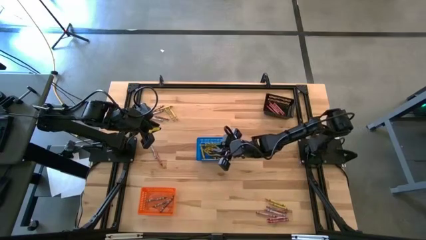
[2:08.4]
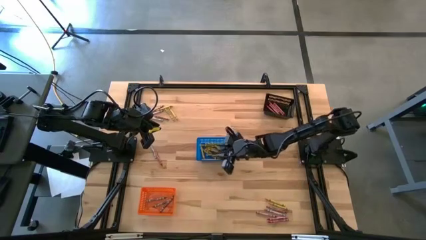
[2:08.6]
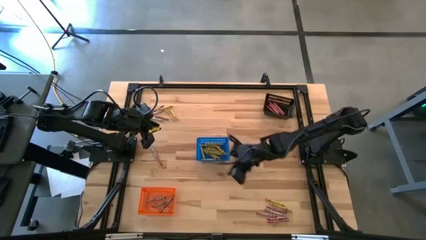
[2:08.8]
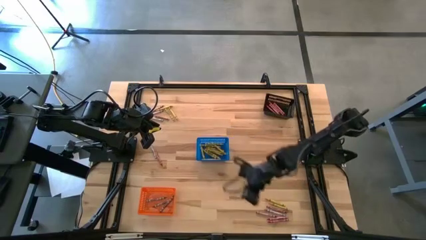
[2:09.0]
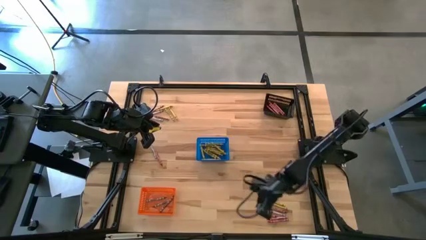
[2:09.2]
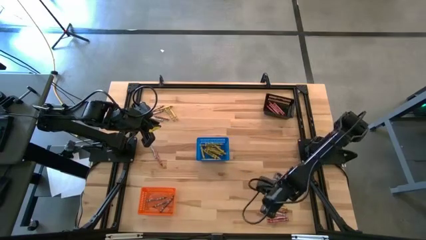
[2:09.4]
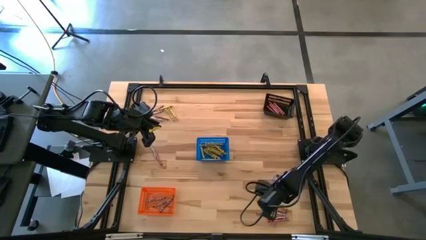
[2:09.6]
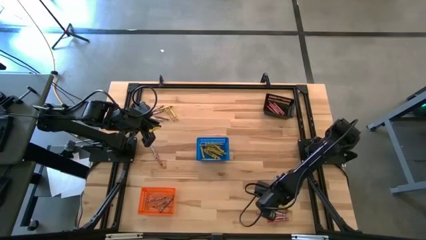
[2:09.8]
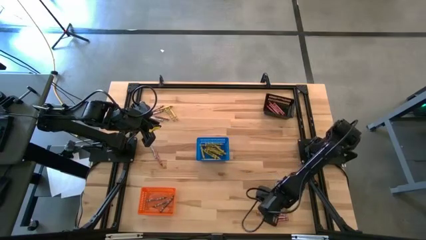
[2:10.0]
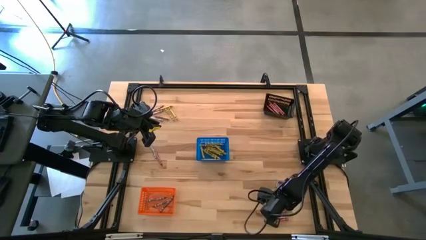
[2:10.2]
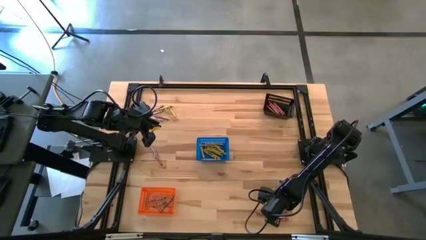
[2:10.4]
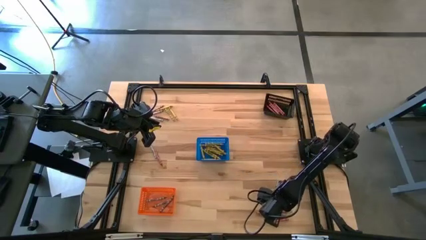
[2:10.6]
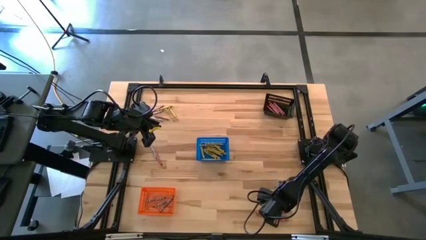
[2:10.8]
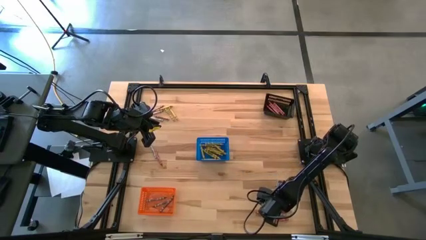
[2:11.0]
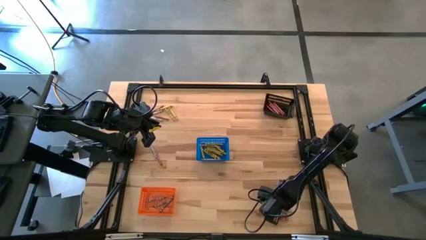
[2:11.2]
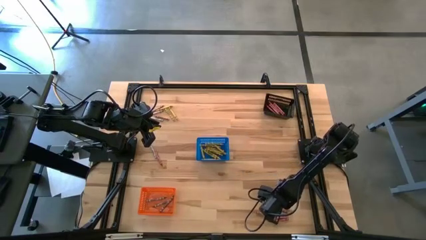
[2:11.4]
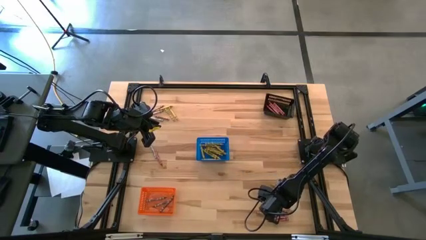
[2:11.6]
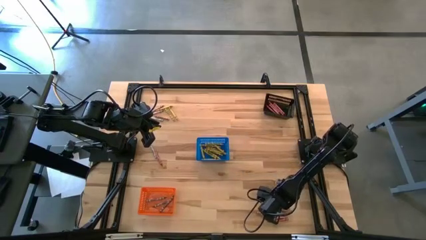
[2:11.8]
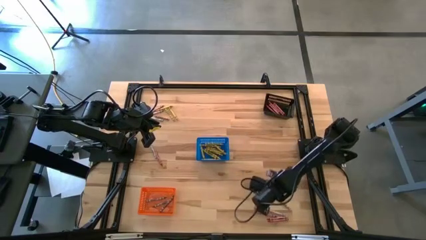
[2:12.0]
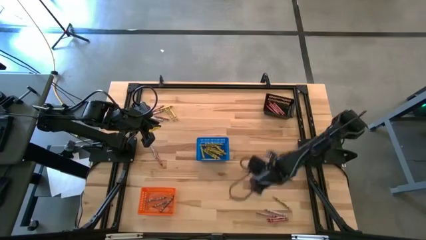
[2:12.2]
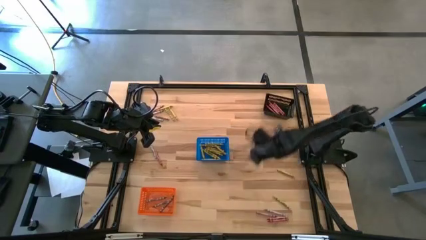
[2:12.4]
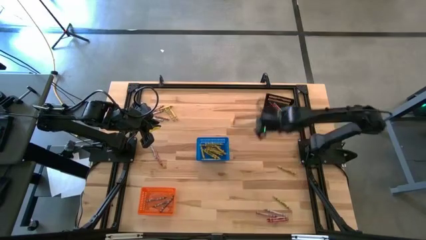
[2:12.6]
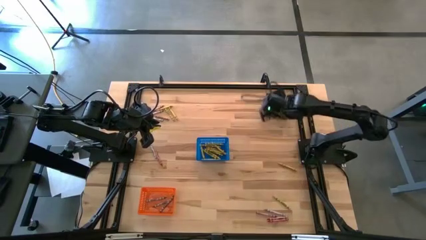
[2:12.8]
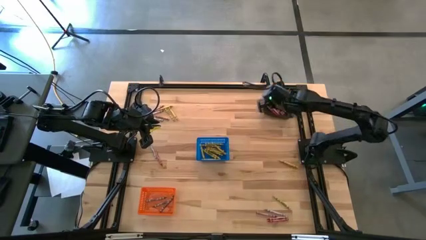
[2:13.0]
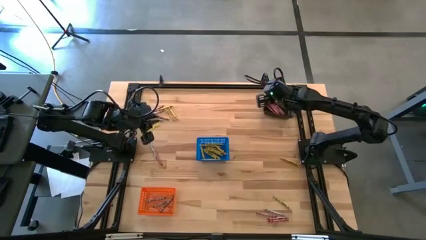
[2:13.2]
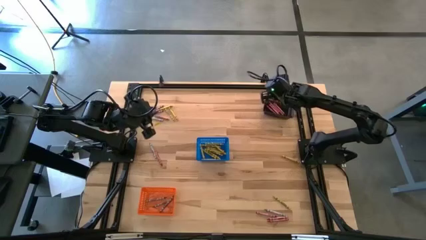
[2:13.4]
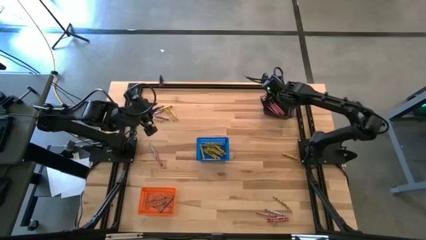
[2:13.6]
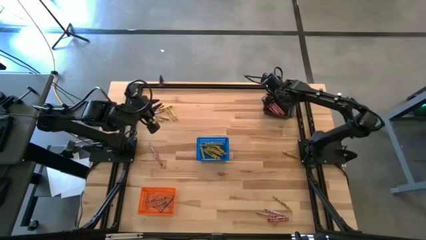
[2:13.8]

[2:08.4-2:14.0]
Task: Sort crayons
Put the red crayon into the black basket

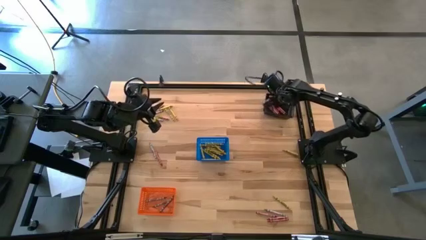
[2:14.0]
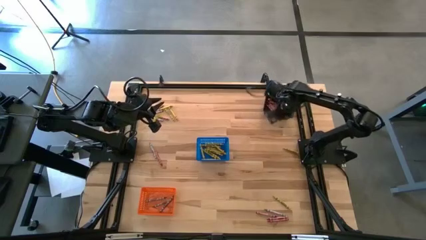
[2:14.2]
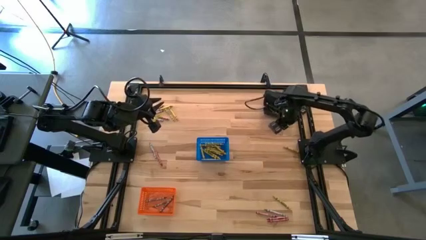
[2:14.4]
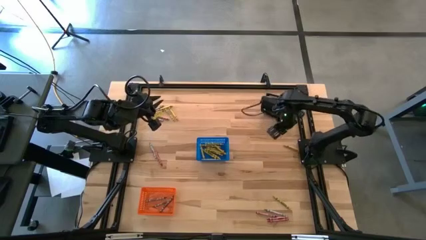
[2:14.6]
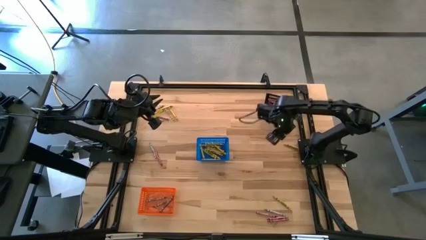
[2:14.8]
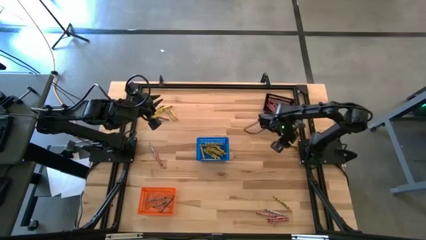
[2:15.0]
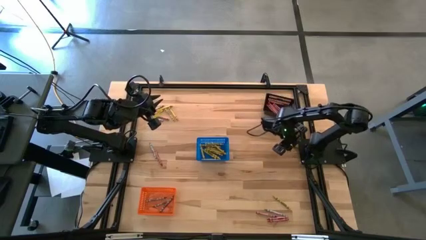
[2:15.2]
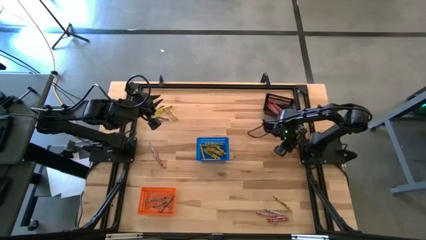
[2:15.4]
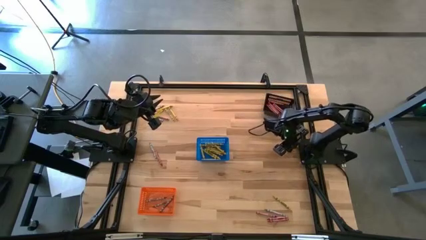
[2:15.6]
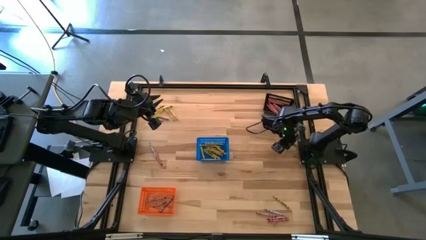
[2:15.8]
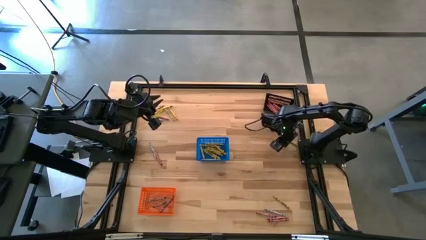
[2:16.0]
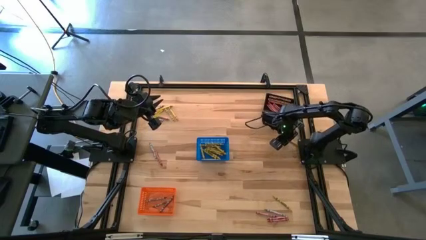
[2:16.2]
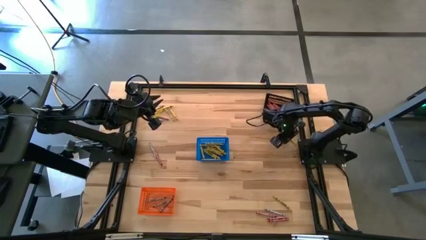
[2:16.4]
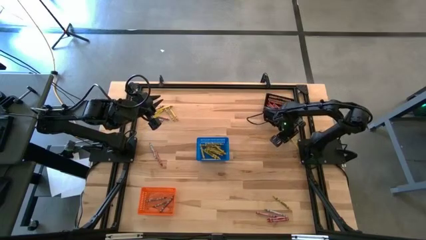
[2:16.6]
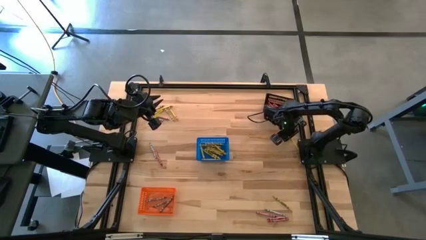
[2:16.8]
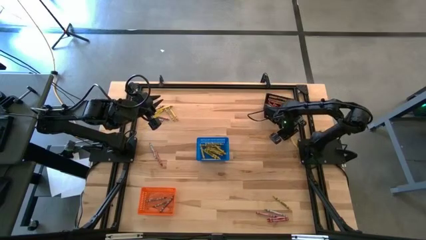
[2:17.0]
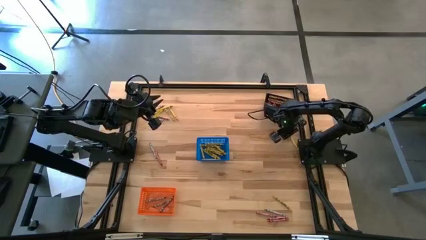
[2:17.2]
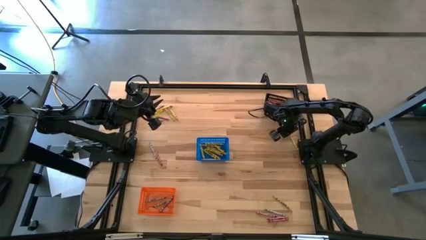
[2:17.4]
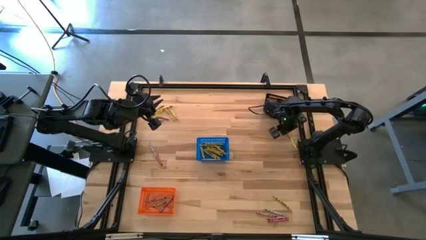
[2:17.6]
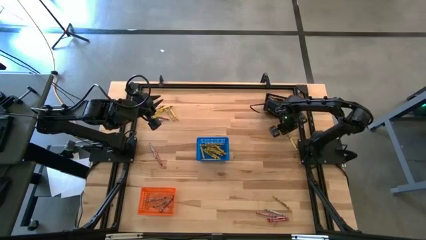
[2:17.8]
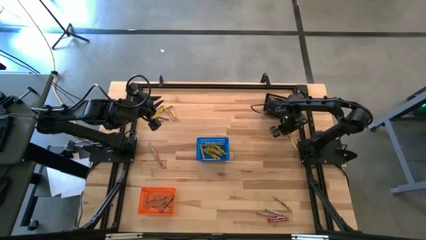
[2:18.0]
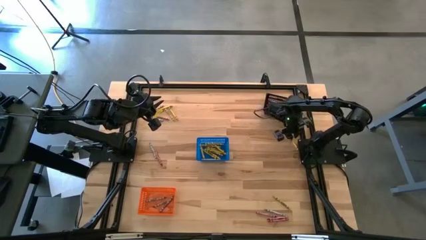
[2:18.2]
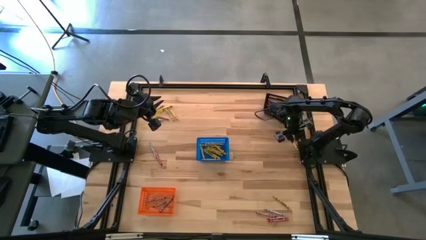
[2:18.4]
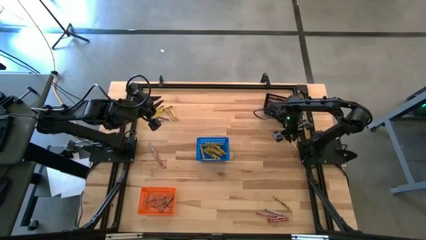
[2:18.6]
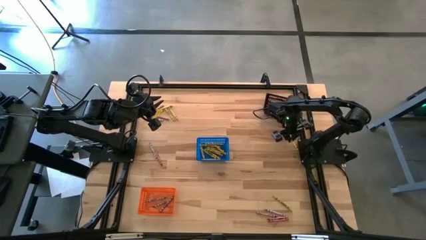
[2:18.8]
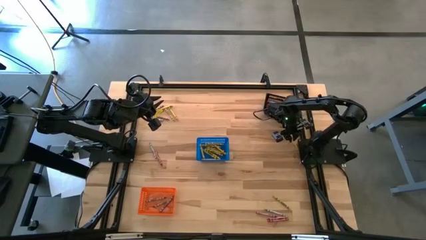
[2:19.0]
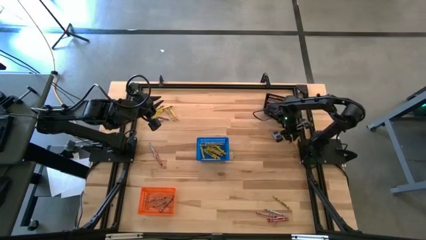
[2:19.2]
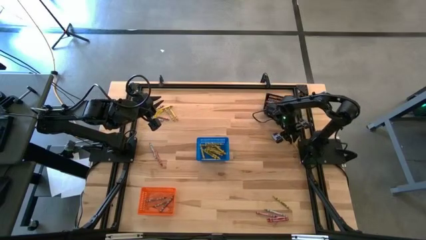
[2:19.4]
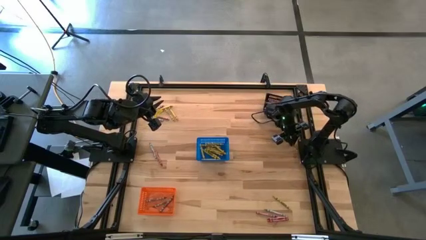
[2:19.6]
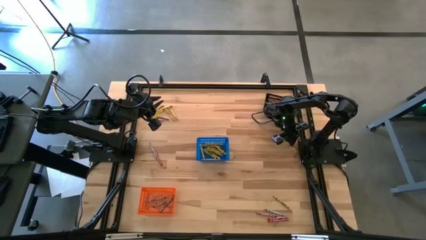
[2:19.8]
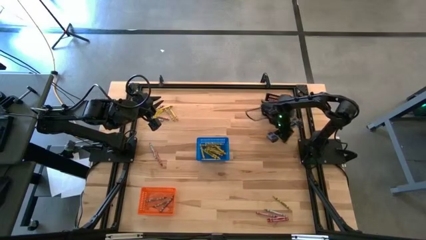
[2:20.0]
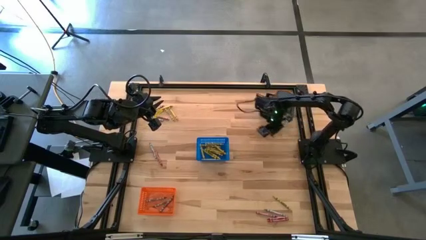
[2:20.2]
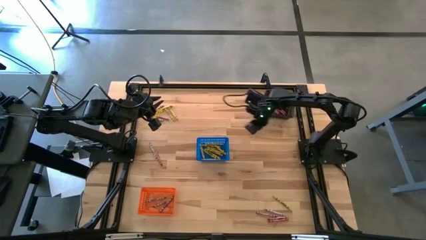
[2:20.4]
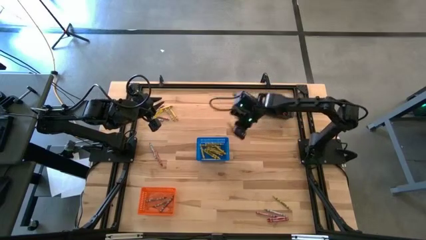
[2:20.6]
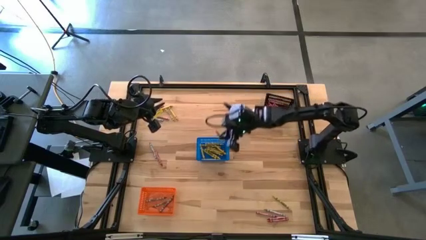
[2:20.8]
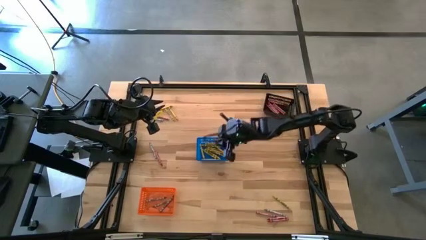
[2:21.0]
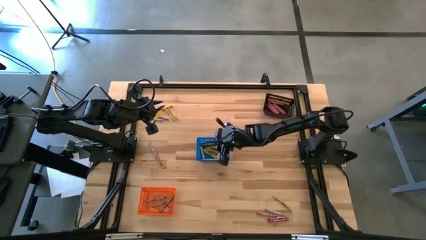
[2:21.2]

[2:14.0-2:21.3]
Put the yellow crayon into the blue basket

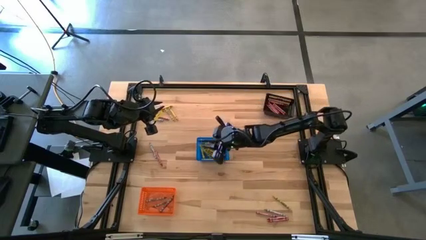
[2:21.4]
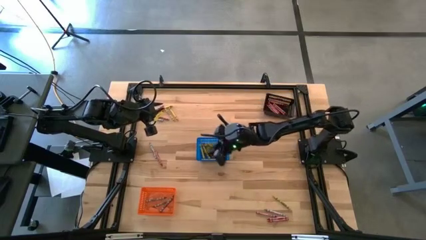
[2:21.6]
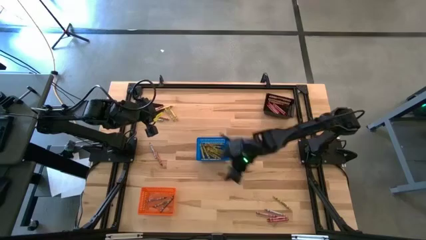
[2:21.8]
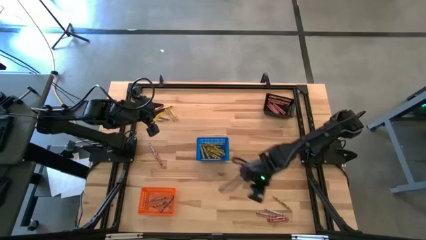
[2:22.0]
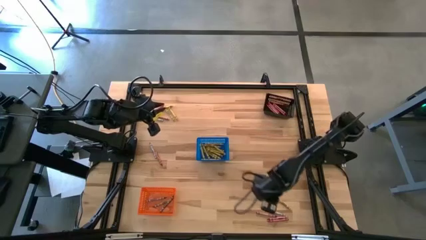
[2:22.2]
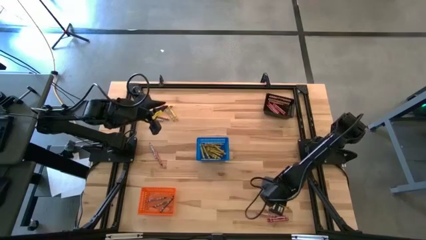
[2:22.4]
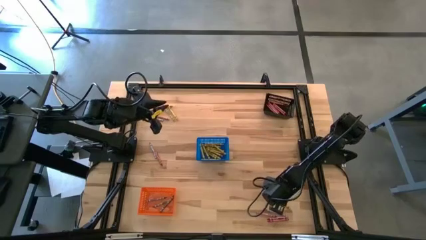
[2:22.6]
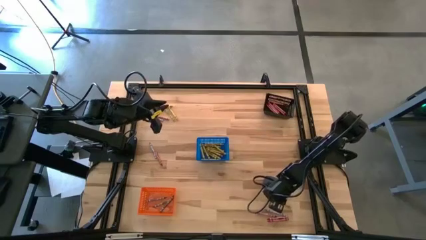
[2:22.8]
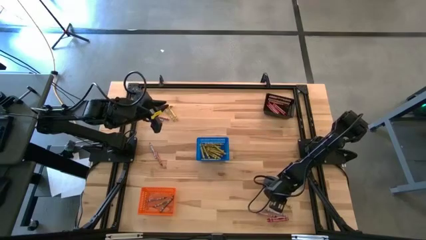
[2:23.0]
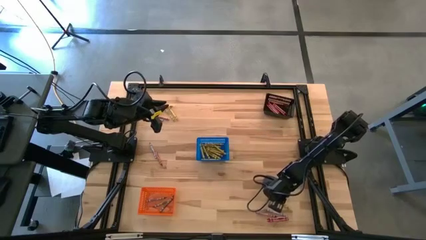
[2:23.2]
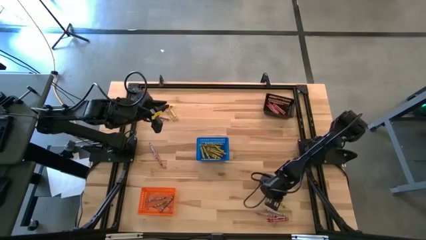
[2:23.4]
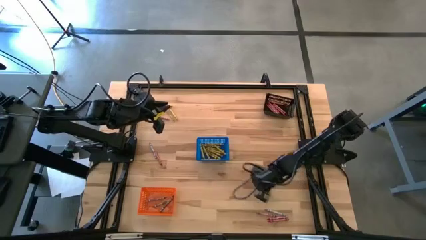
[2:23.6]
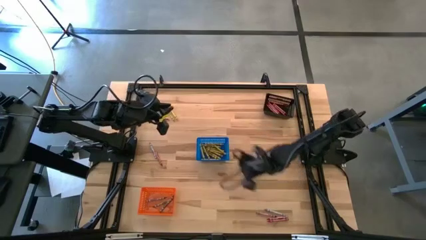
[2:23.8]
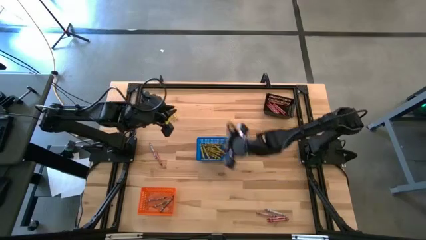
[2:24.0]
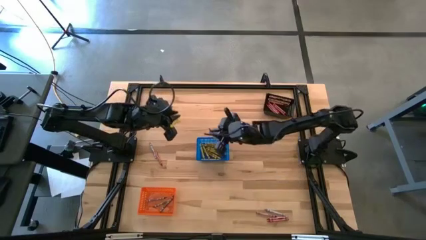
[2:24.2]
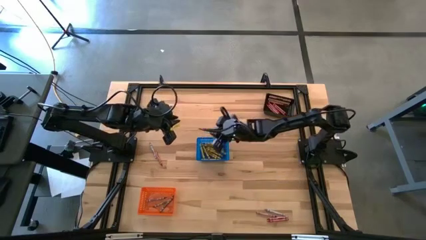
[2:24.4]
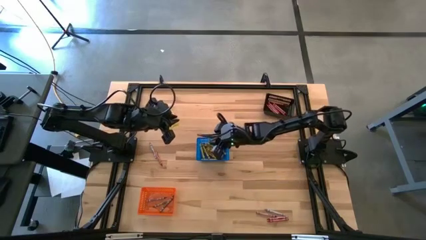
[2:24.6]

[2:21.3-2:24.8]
Put the yellow crayon into the blue basket
